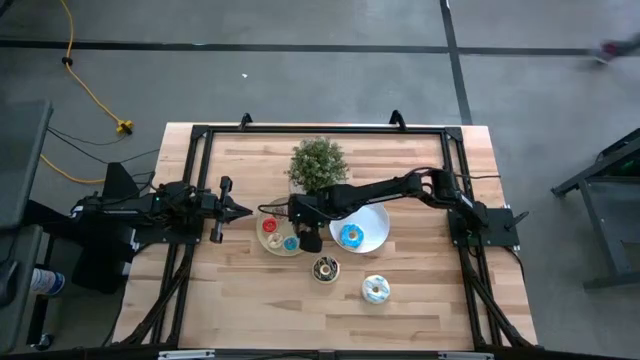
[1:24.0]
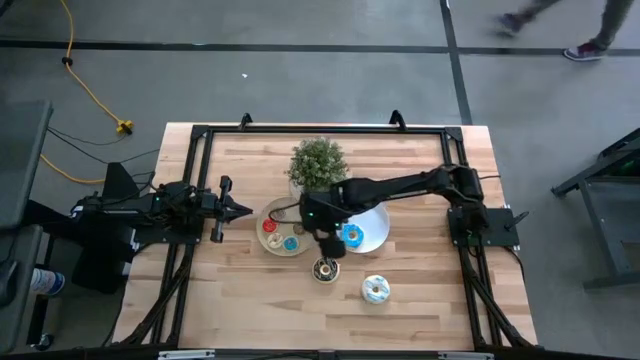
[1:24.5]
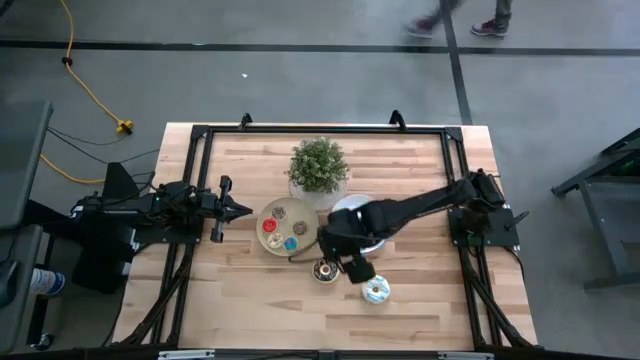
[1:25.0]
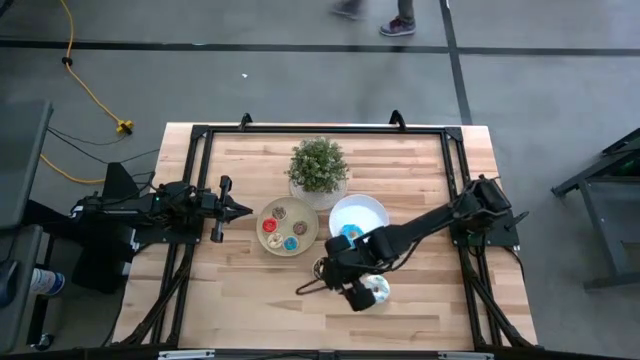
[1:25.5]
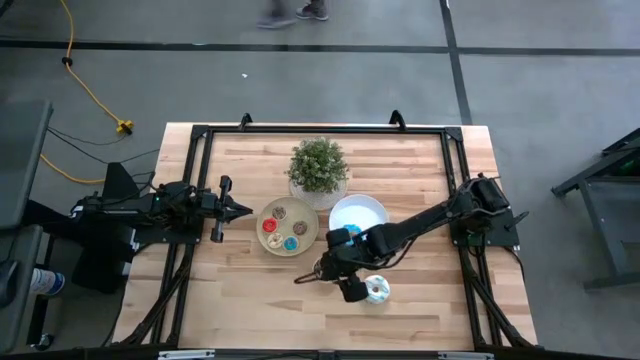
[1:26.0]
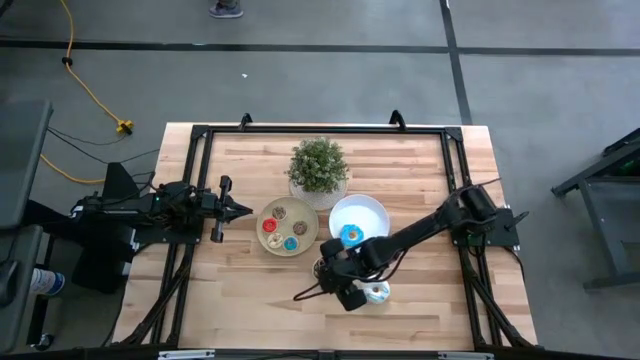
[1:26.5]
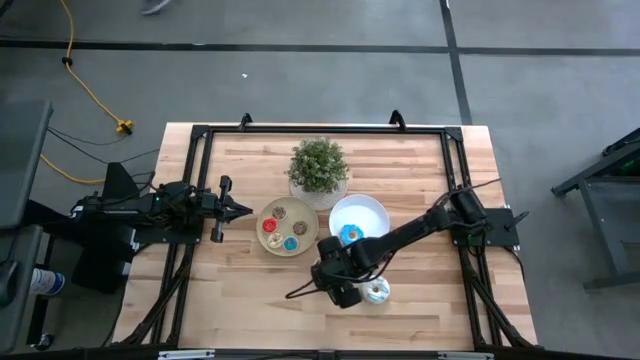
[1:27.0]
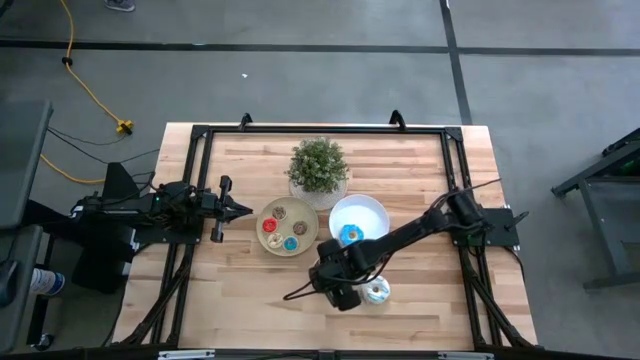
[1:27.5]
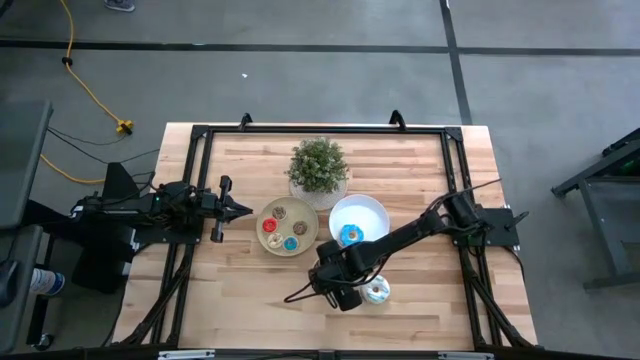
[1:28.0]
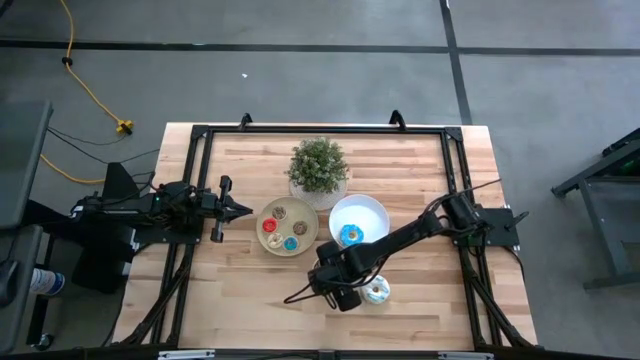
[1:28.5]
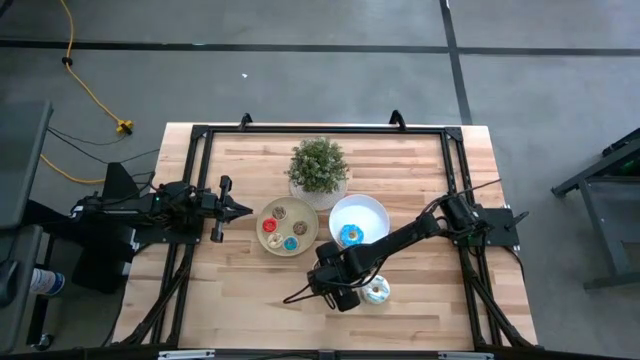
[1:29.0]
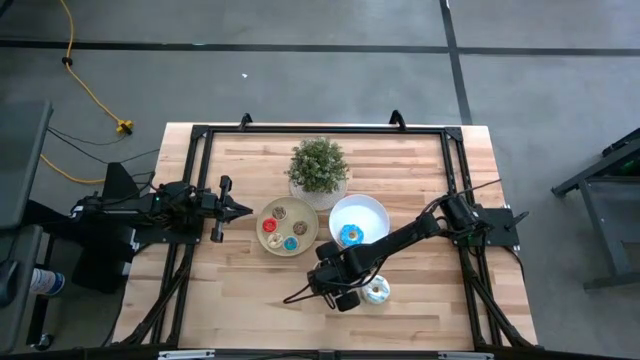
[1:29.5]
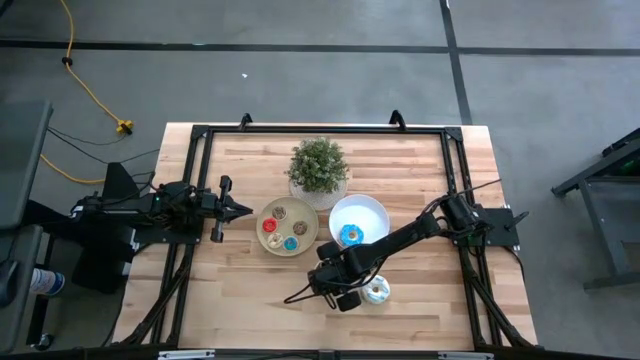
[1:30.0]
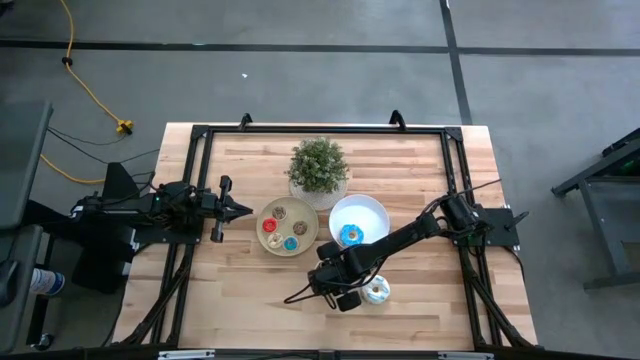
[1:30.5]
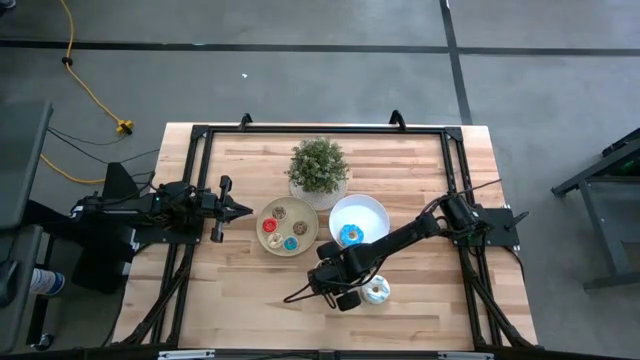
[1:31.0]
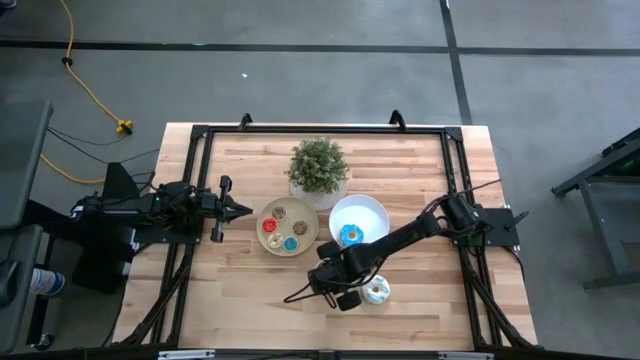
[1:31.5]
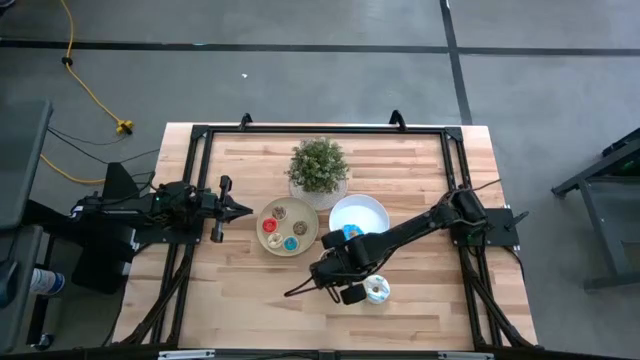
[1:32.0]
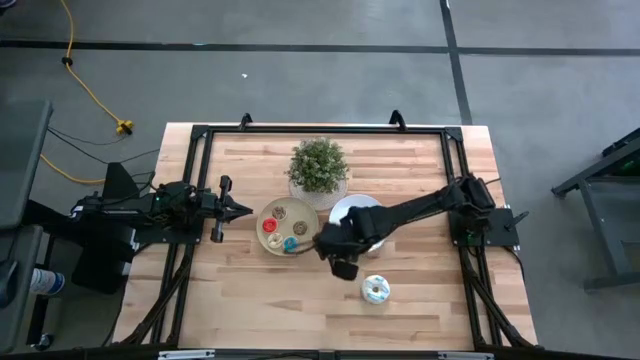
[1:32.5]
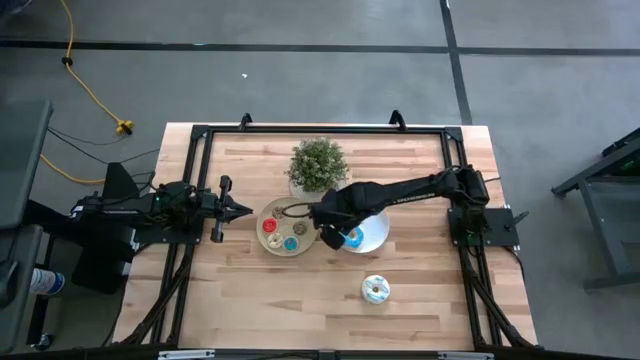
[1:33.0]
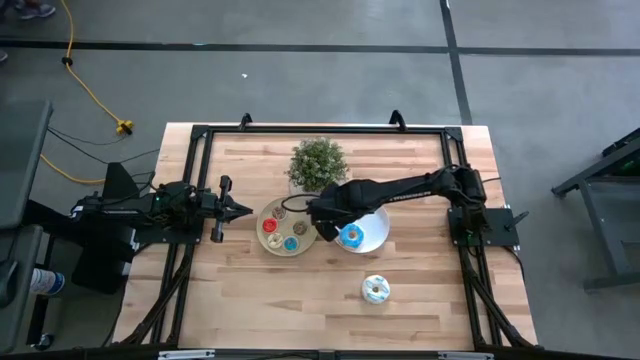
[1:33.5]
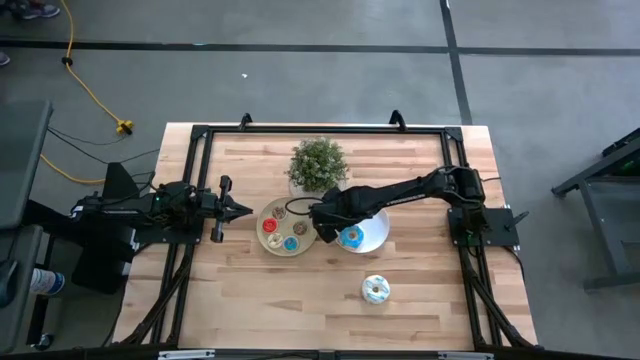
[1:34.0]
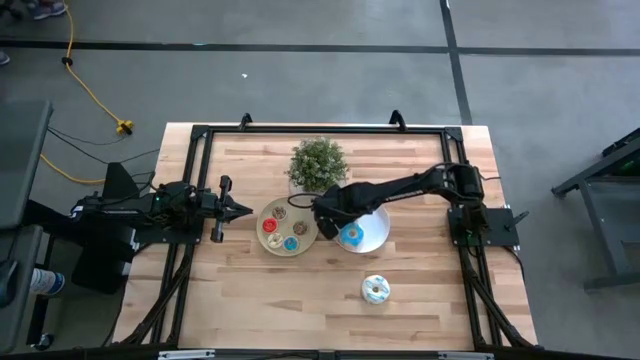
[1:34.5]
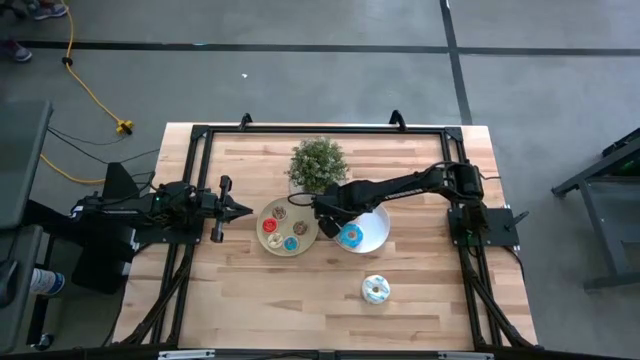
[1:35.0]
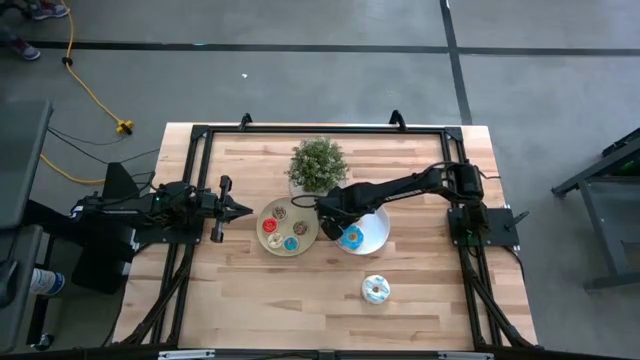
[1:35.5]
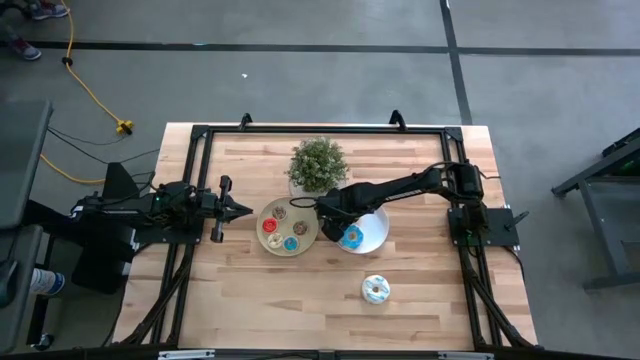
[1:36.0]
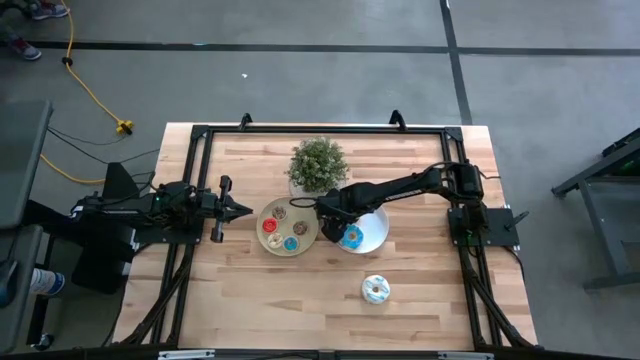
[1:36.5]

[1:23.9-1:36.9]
Task: Pick & Place donuts
Put the large black donut on the white plate

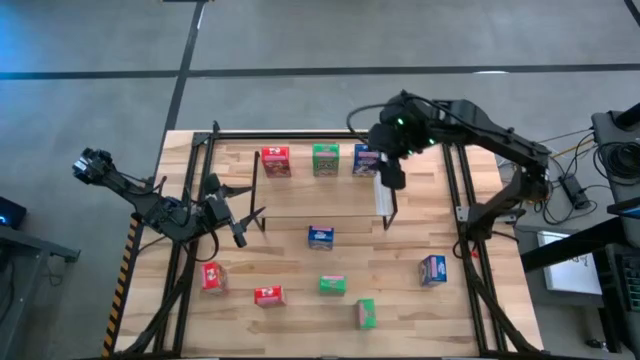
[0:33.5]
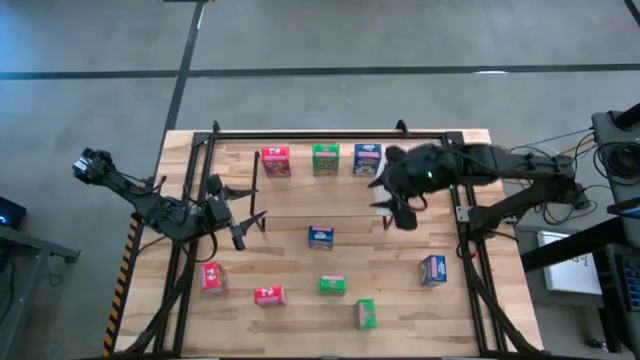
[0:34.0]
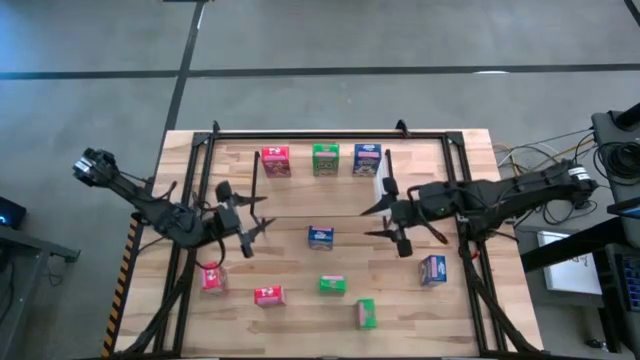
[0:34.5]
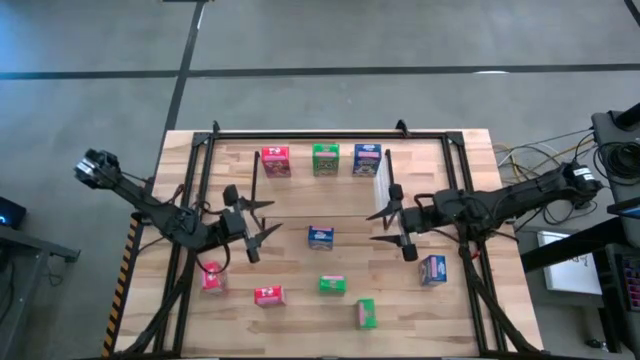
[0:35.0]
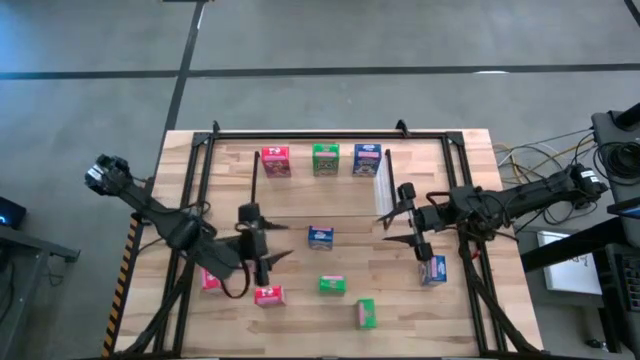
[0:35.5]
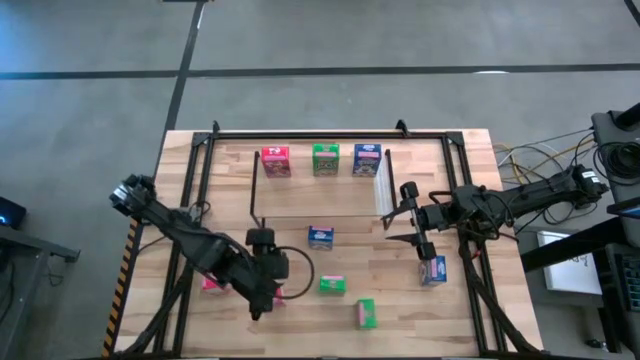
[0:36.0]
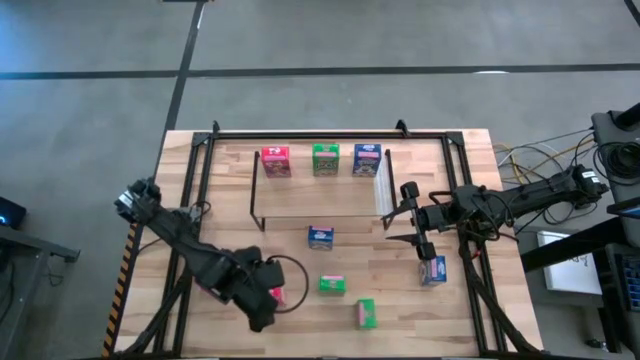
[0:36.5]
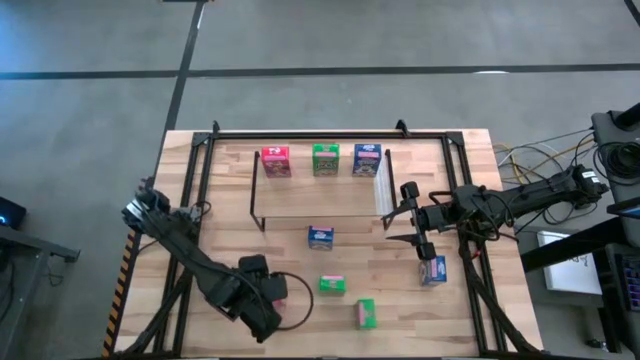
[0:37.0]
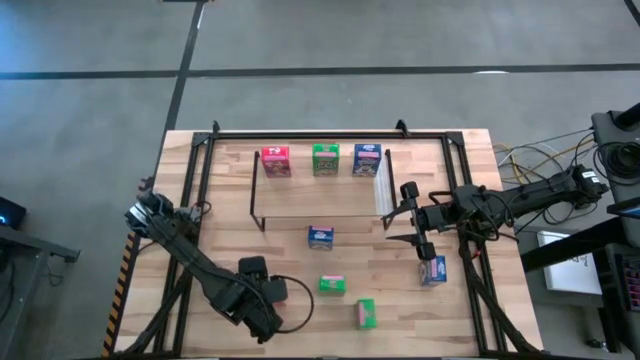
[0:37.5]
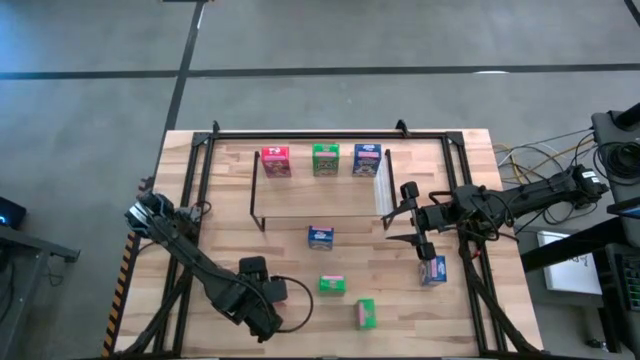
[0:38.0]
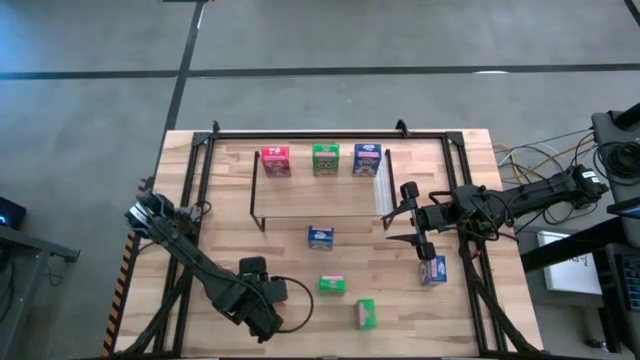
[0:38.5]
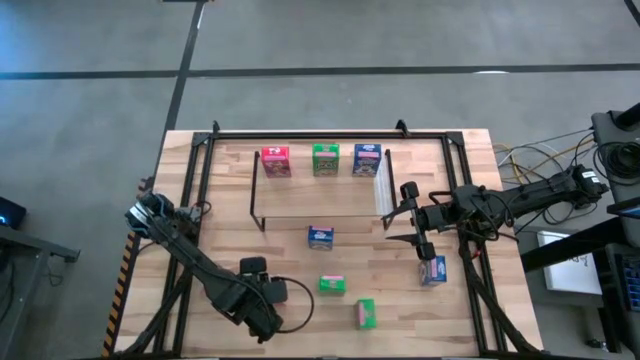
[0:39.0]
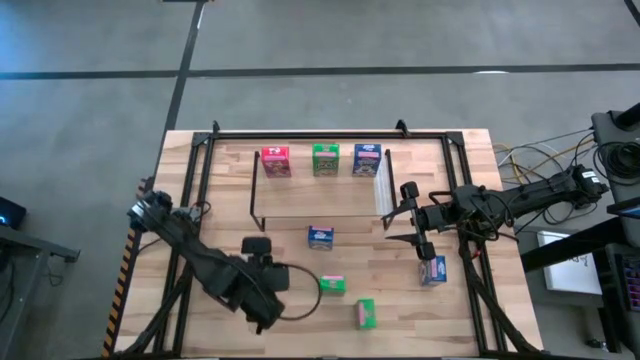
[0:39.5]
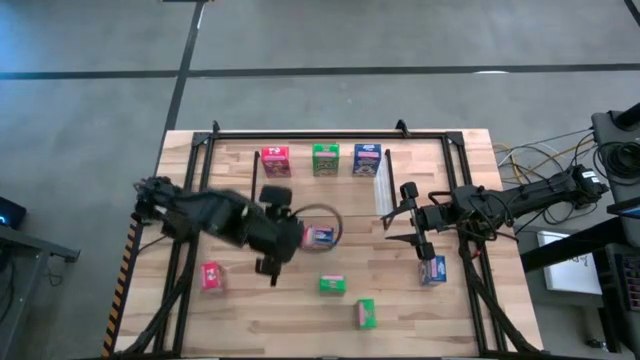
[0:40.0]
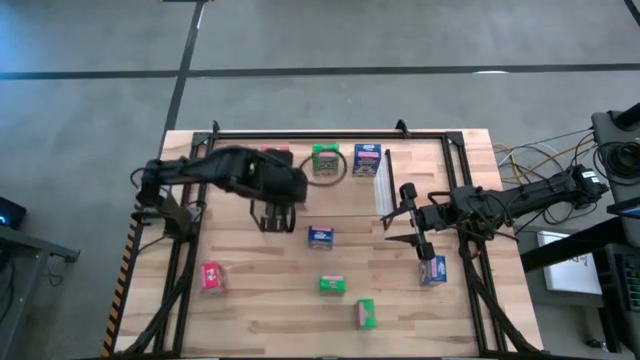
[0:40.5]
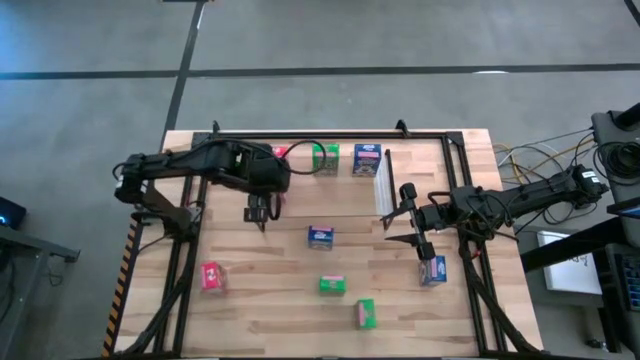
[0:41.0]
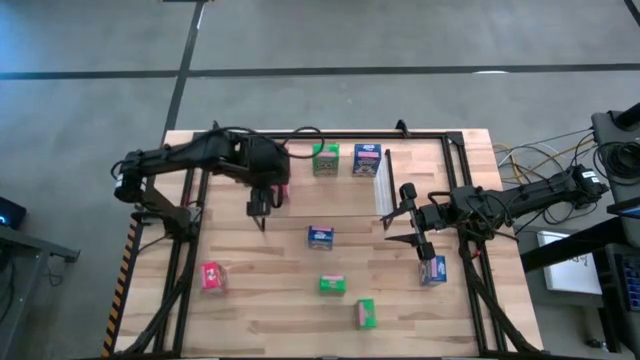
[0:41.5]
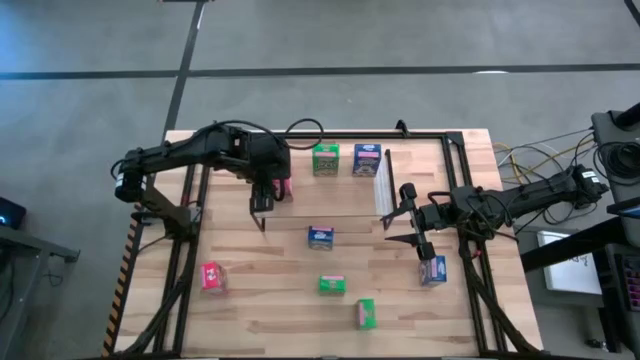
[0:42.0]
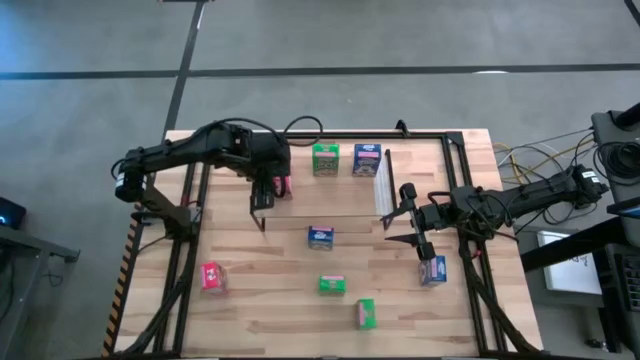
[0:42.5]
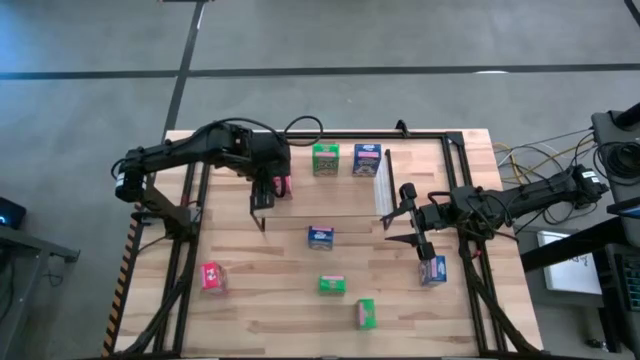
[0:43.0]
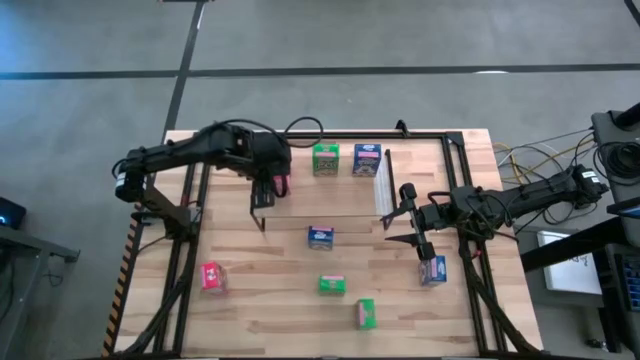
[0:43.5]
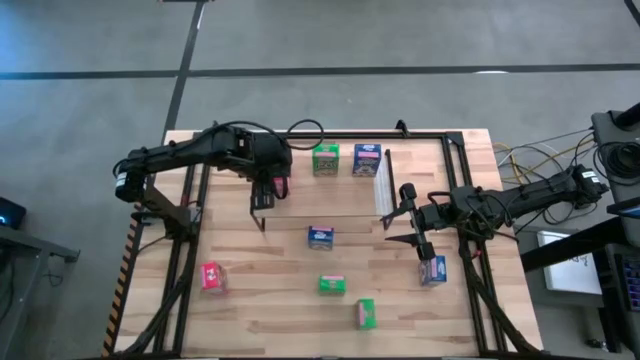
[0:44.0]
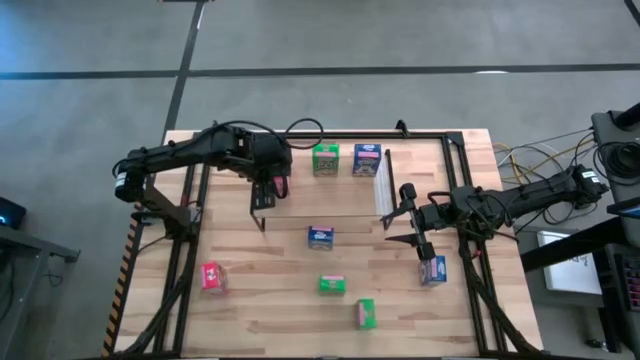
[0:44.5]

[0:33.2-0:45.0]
Task: Stack cereal on shelf
Put the right red cereal box on the shelf, aligned with the other red cereal box
